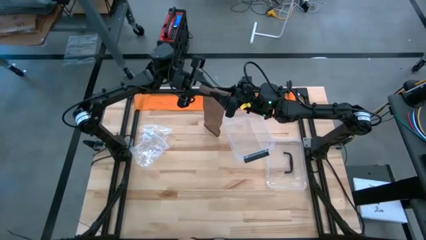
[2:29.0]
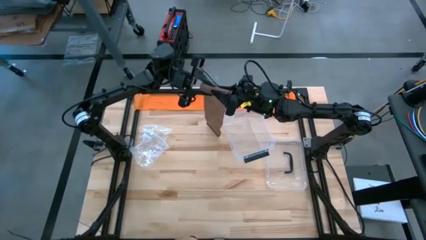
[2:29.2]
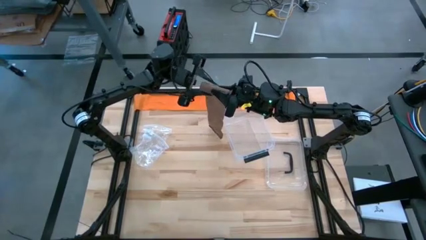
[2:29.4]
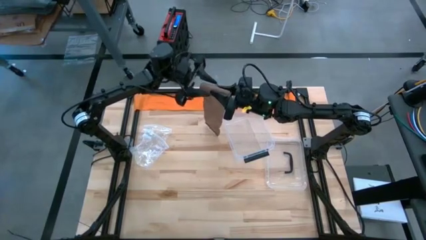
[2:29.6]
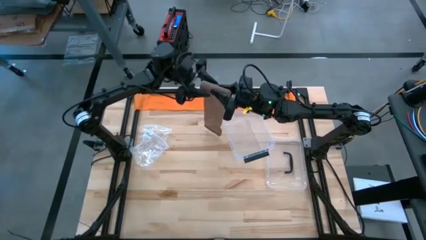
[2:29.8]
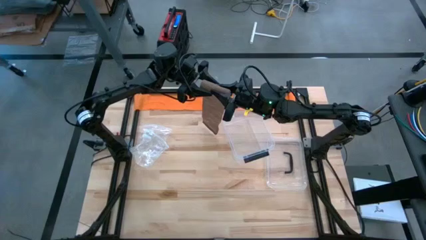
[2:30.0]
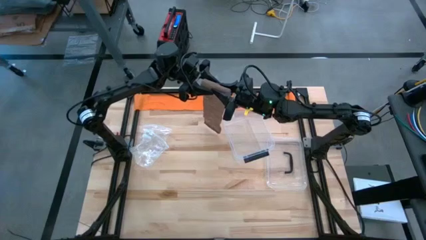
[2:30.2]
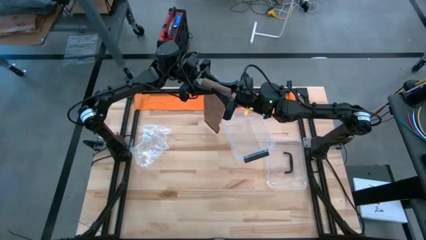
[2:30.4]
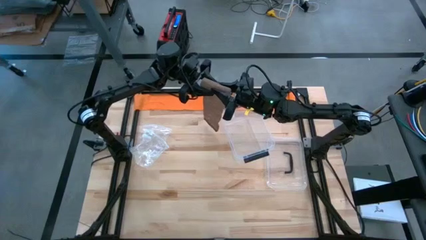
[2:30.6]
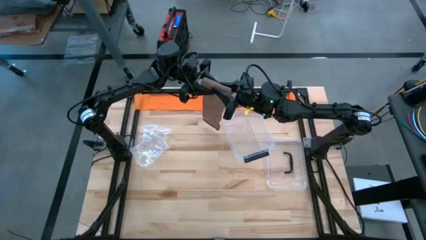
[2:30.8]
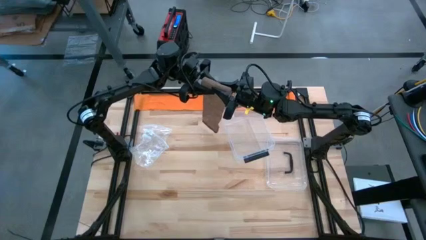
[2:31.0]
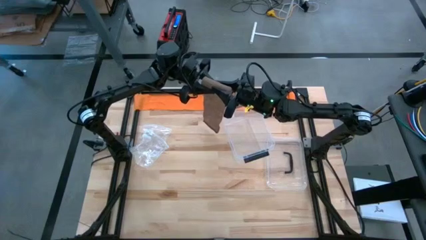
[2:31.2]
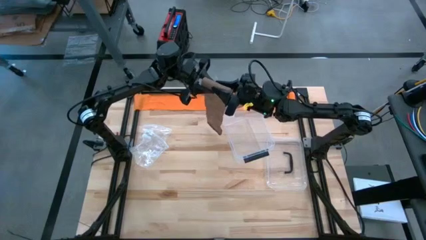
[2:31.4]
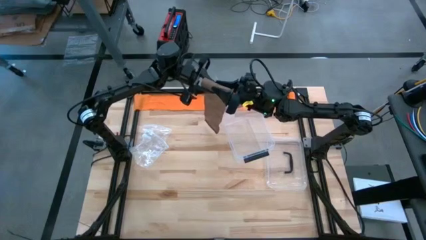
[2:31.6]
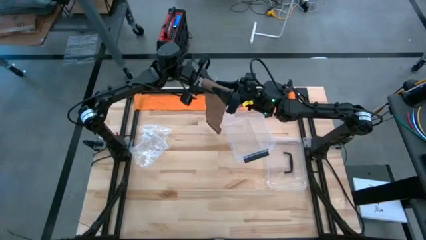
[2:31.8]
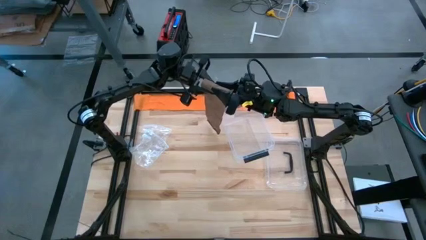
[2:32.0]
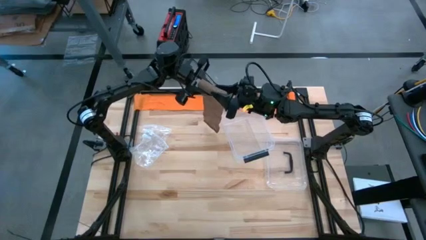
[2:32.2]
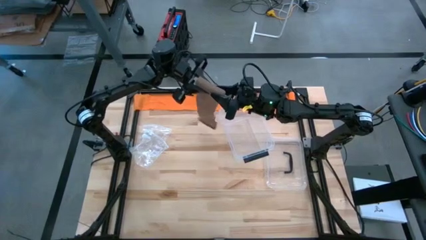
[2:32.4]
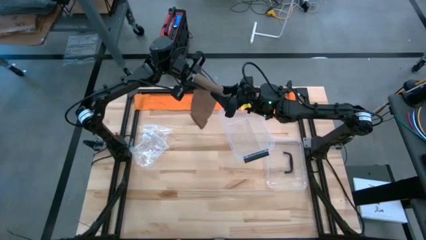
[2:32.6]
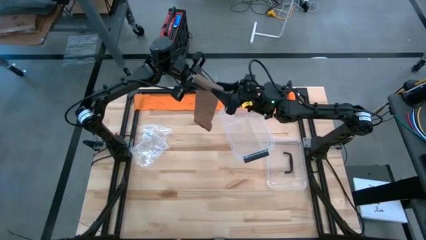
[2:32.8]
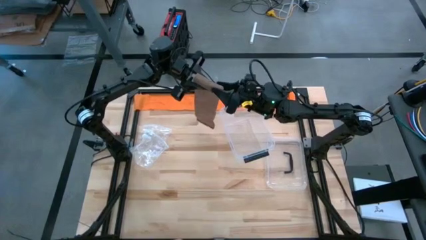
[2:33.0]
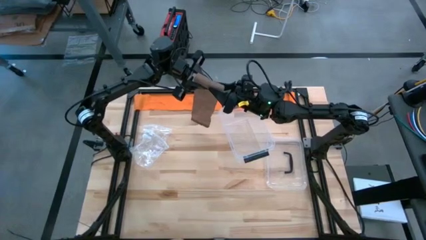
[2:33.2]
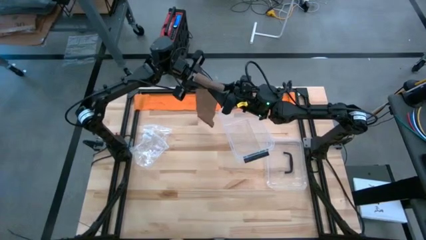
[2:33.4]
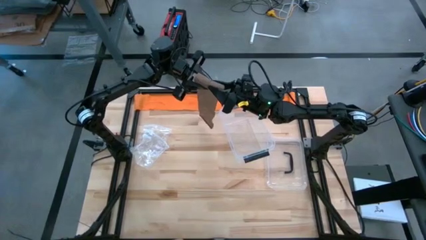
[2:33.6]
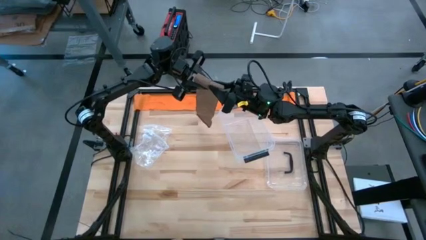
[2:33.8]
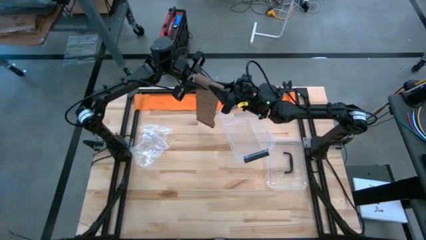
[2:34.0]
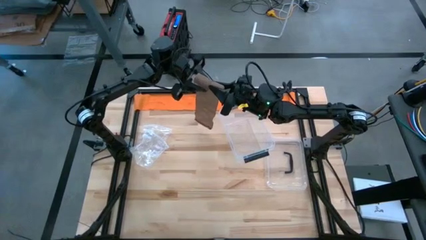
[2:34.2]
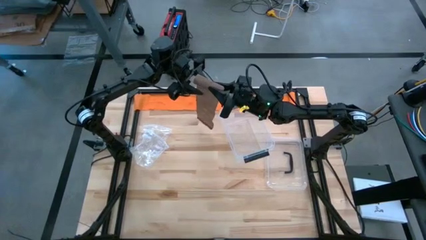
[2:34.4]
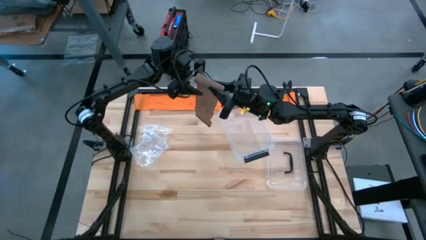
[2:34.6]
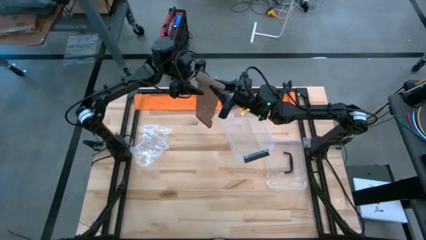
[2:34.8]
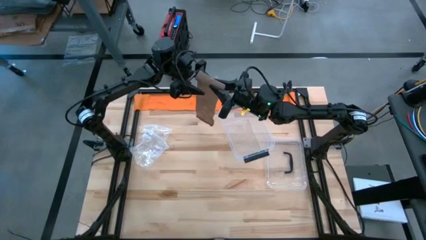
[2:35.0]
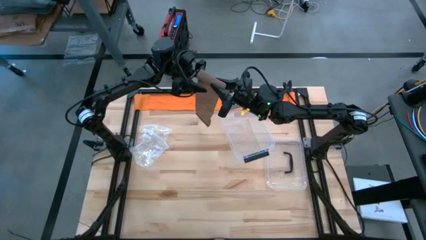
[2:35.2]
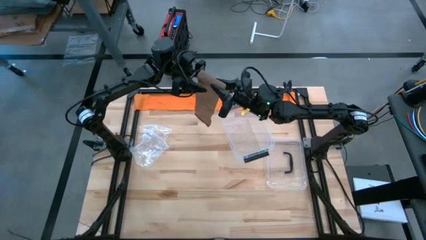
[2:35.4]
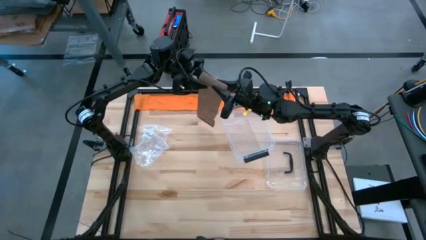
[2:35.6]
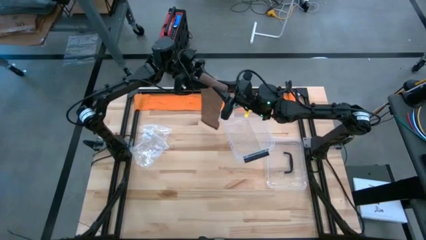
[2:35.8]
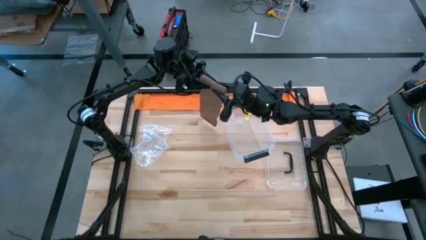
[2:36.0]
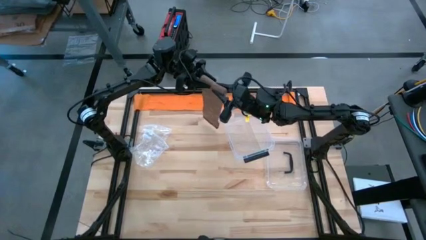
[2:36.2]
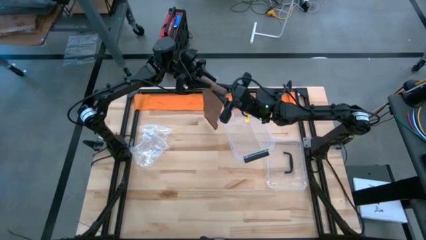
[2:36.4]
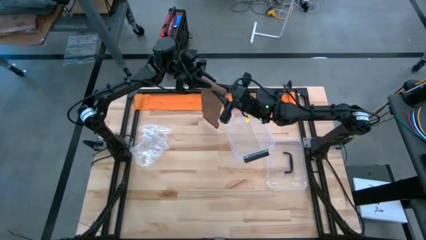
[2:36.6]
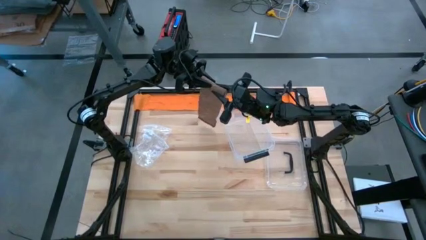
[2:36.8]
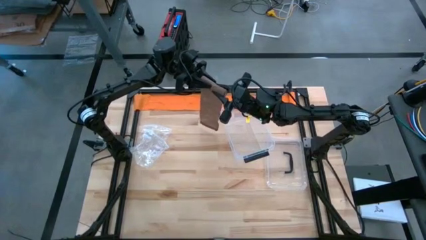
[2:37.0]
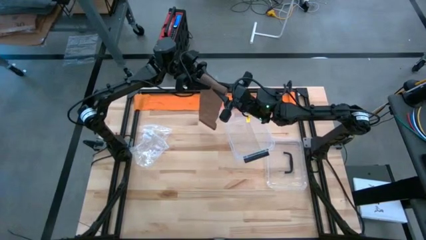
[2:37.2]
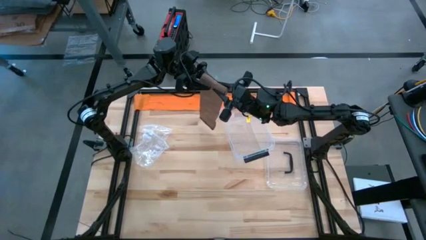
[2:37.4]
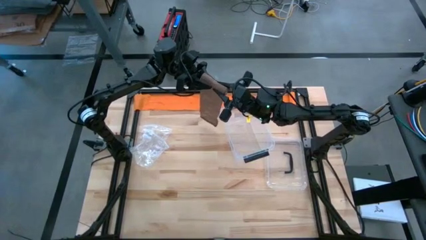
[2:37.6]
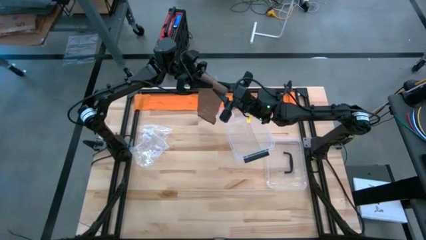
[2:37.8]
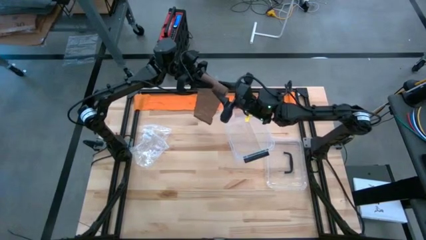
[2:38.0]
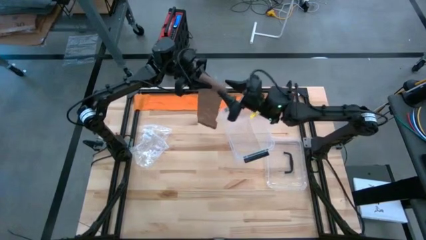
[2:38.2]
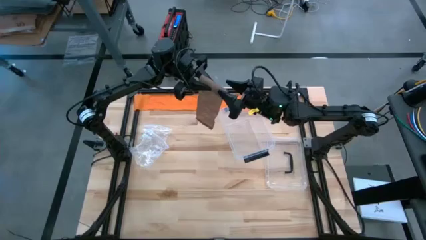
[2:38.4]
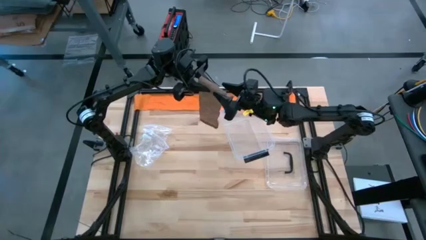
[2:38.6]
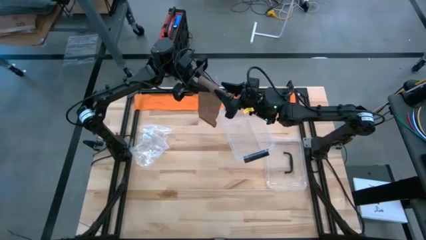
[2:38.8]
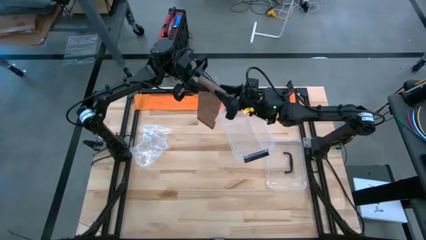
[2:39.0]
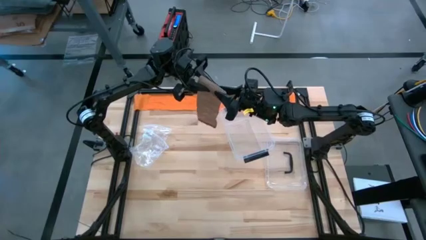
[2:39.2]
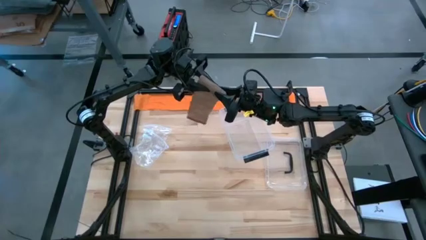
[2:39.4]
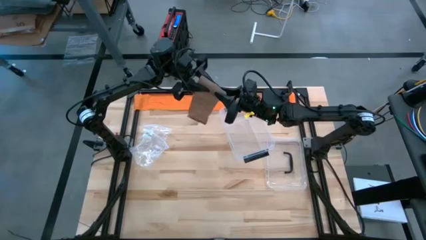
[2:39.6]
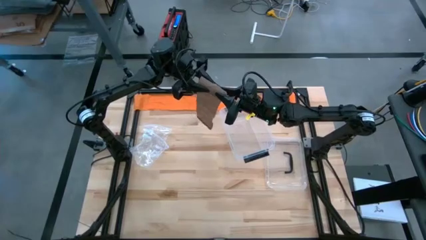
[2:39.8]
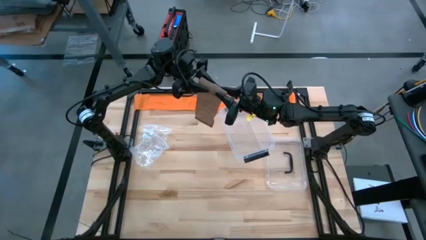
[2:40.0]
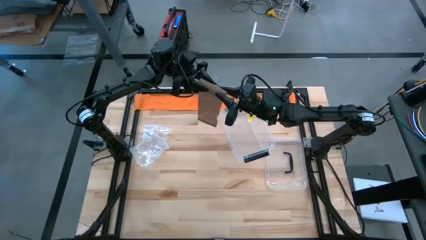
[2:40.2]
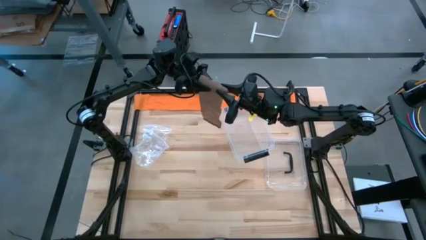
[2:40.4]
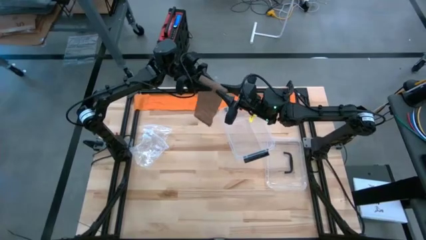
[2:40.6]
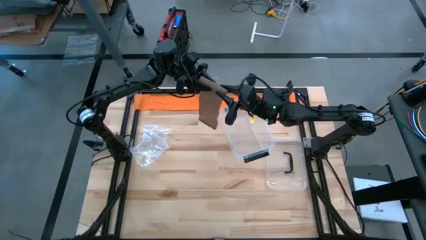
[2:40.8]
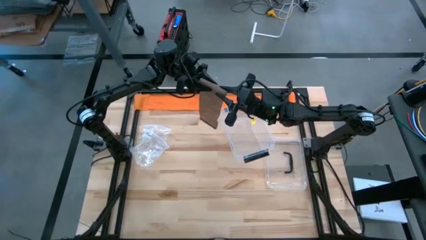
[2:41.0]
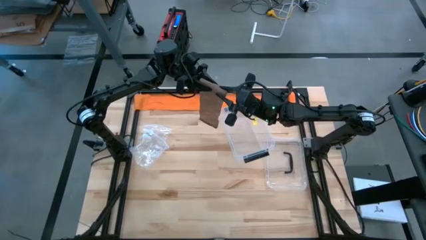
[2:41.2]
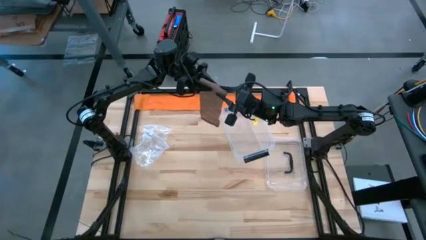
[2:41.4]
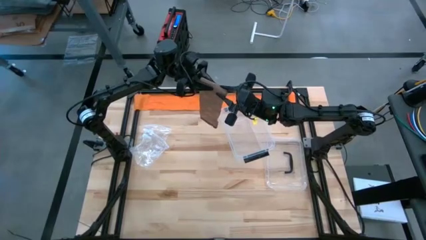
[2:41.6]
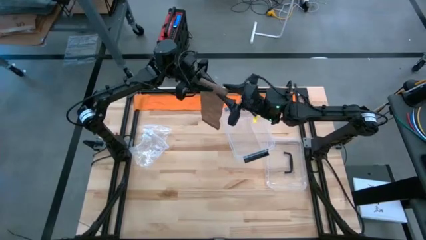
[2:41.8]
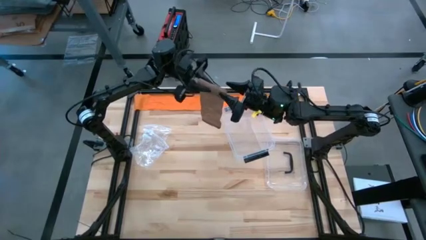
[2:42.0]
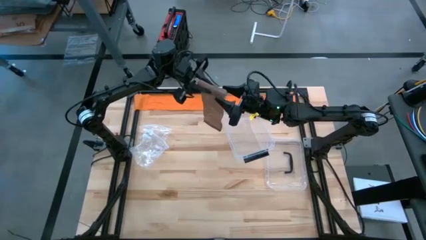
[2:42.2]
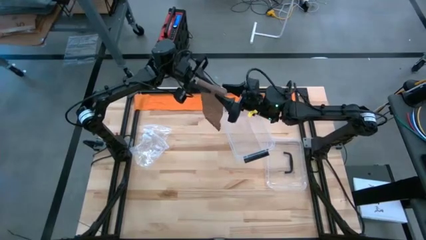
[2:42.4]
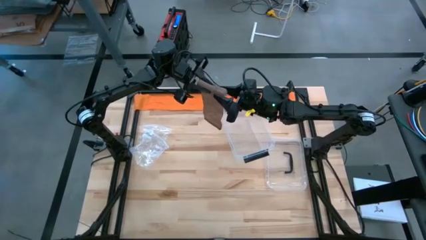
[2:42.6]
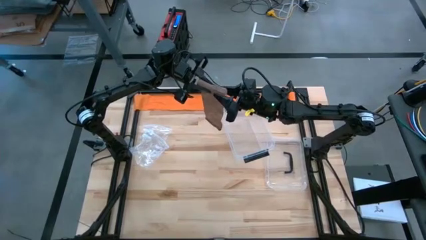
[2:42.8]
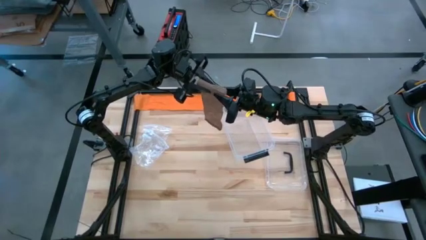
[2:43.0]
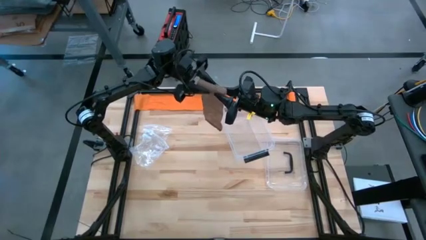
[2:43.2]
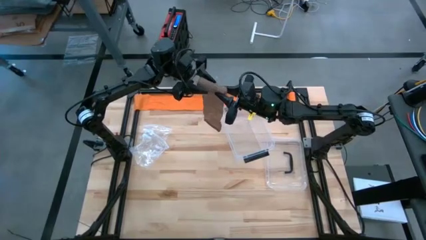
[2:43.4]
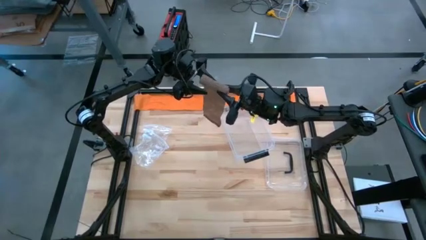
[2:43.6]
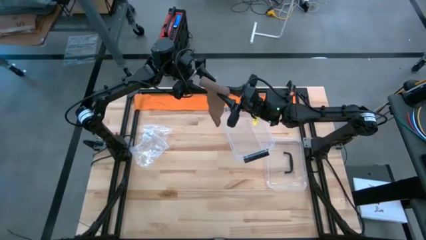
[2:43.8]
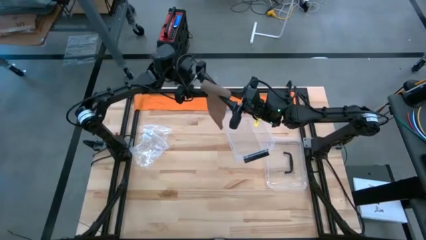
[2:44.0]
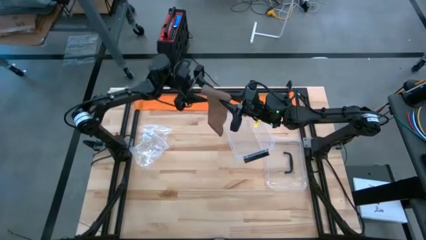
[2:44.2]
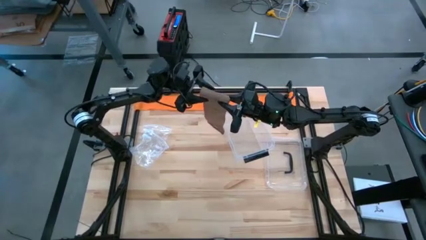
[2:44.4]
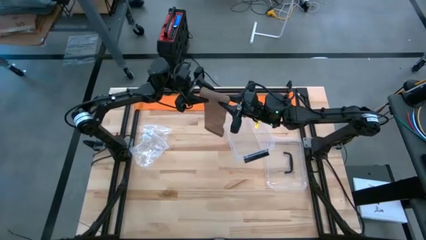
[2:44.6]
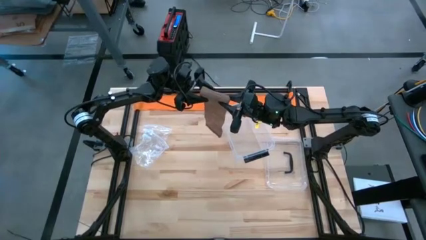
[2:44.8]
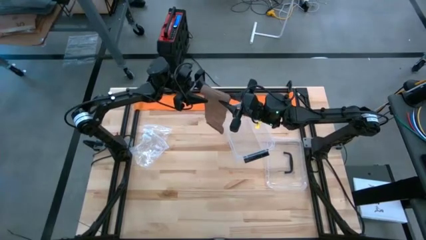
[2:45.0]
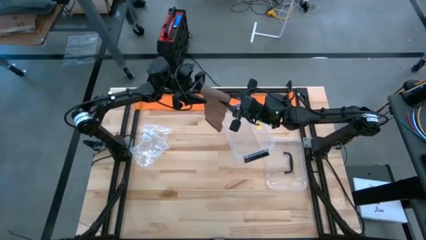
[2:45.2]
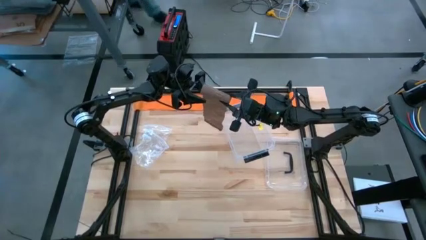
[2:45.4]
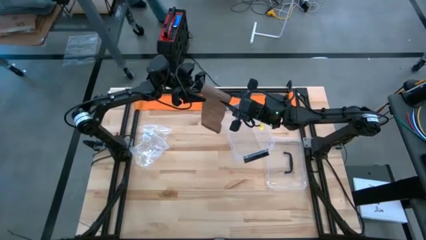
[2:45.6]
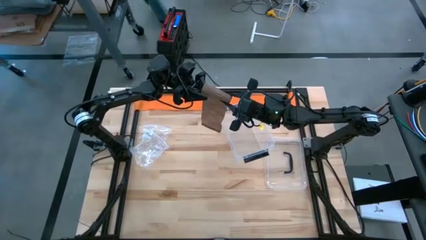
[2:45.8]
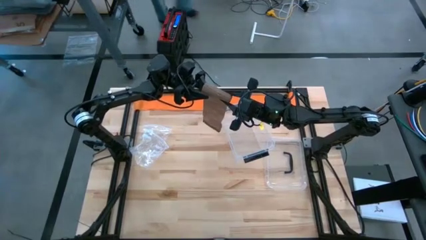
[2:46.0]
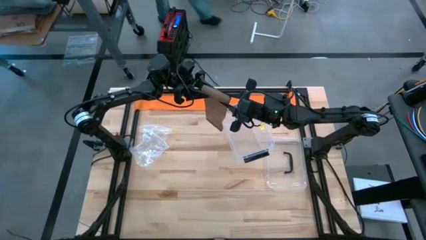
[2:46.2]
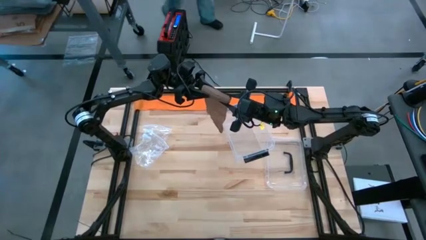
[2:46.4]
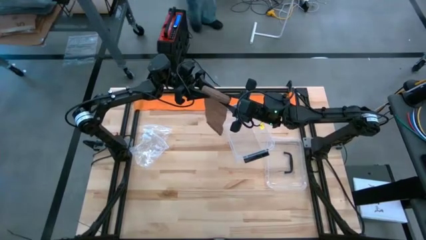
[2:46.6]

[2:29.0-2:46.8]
Task: Roll bandage
Roll the brown bandage
